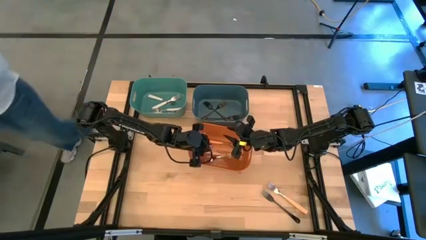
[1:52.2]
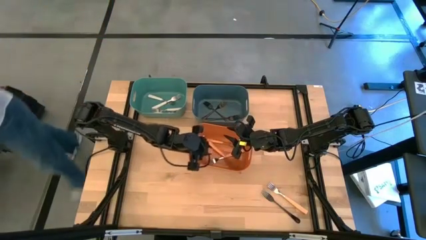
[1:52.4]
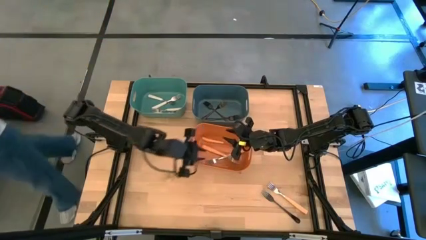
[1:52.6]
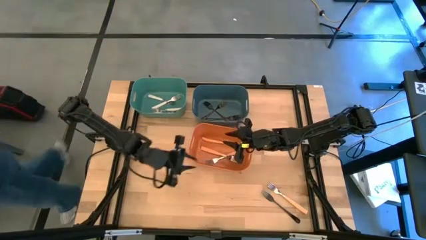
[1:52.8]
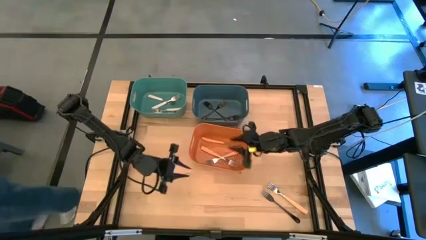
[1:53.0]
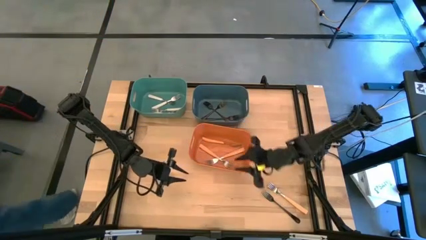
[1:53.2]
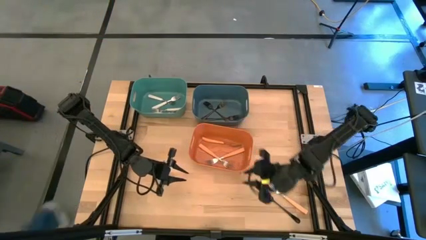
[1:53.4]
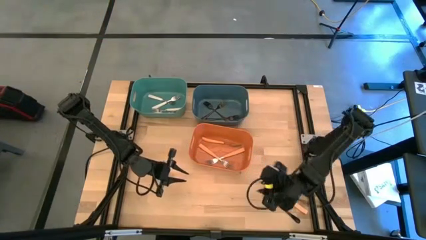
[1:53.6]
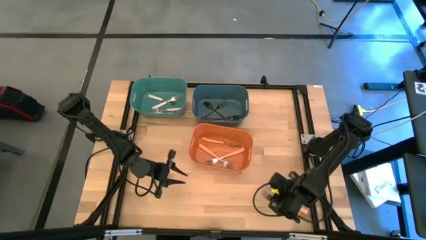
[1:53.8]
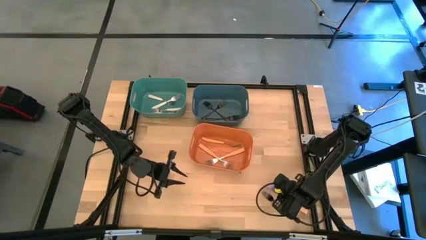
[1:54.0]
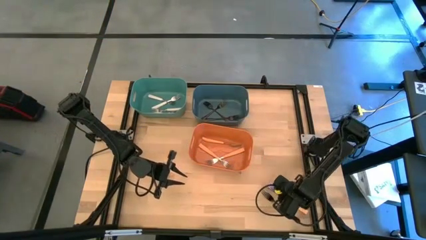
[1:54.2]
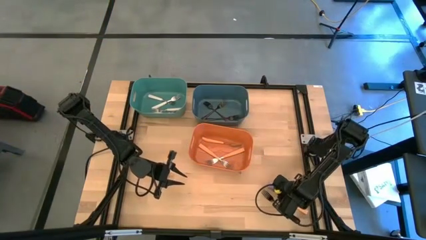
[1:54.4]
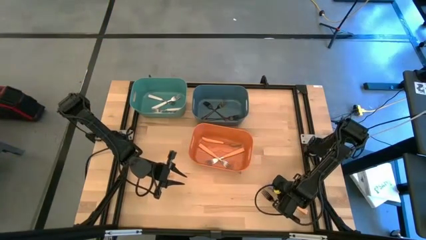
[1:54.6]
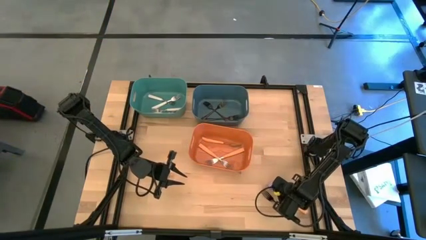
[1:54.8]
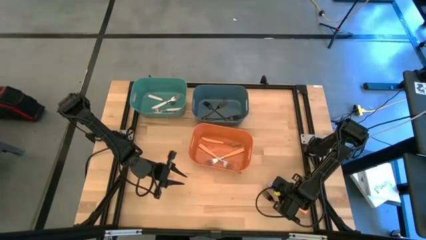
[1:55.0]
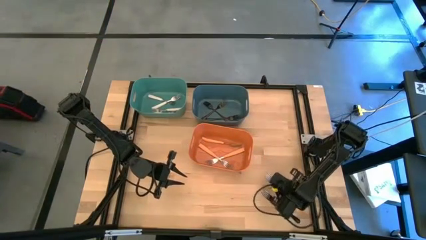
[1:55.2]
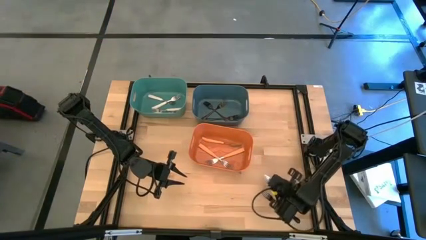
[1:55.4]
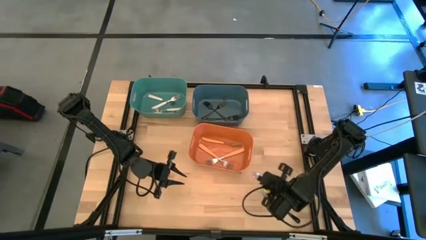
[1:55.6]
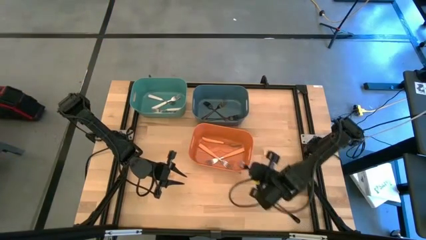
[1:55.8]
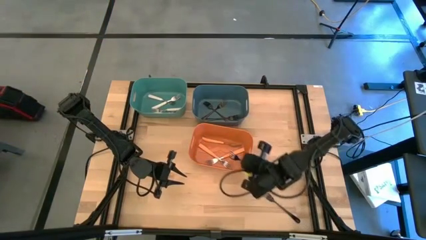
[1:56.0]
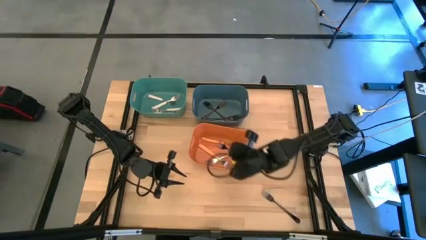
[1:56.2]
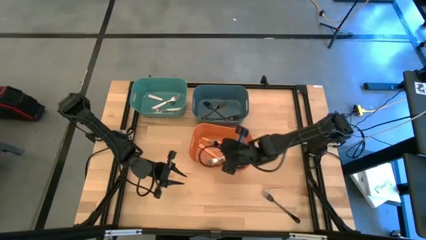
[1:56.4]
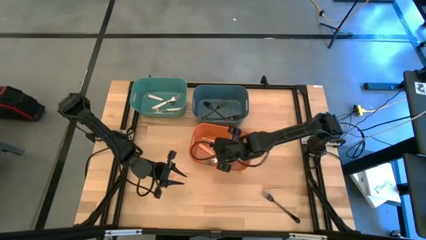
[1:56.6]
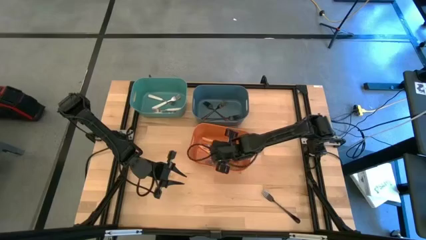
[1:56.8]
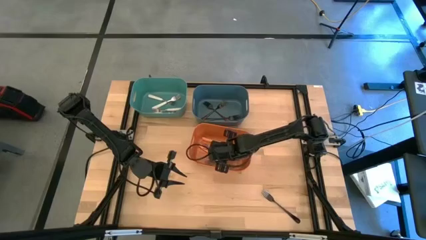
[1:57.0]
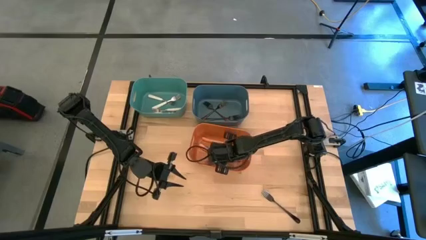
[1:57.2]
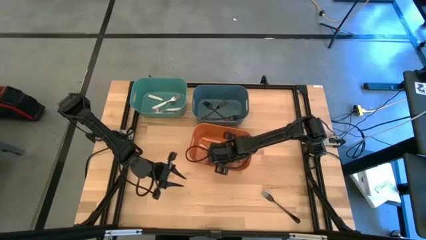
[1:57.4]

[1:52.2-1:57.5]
Task: Sort silverware by color (type)
Put the orange fork into the orange bin

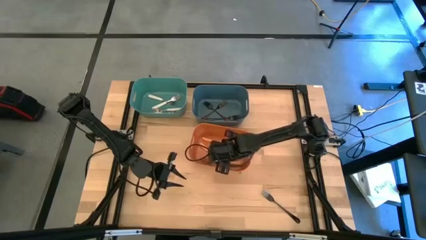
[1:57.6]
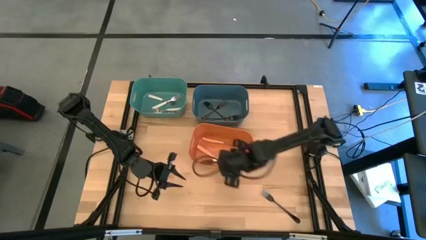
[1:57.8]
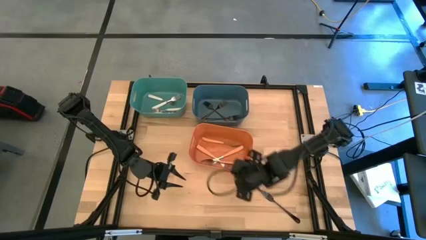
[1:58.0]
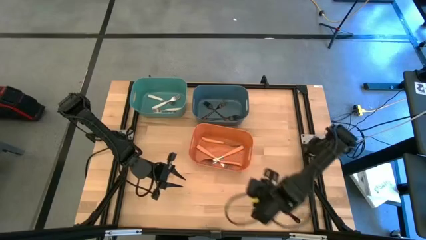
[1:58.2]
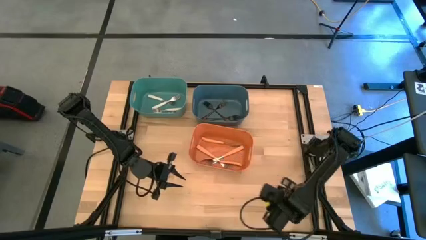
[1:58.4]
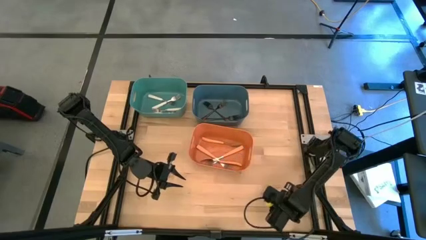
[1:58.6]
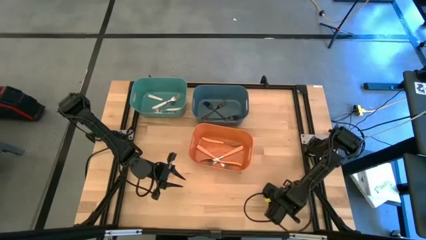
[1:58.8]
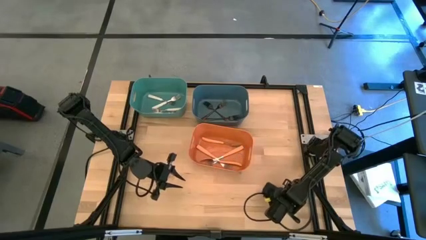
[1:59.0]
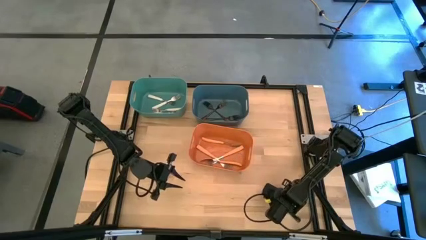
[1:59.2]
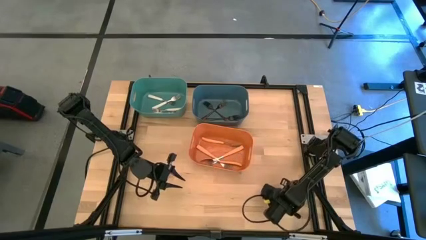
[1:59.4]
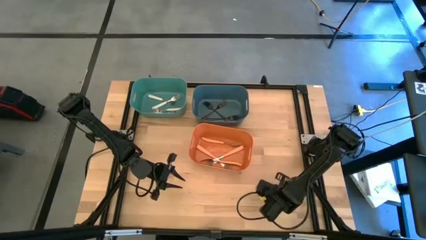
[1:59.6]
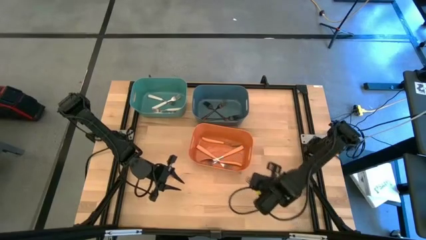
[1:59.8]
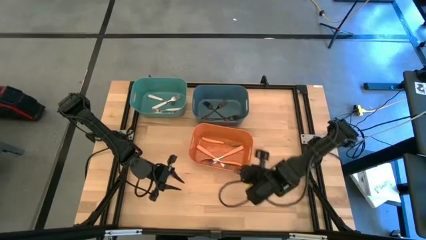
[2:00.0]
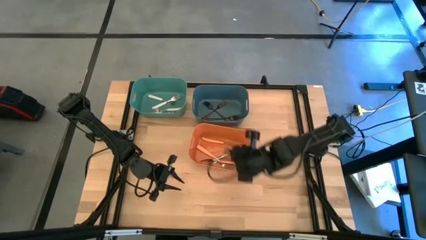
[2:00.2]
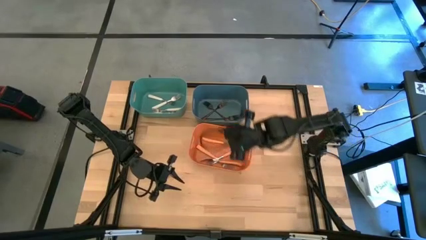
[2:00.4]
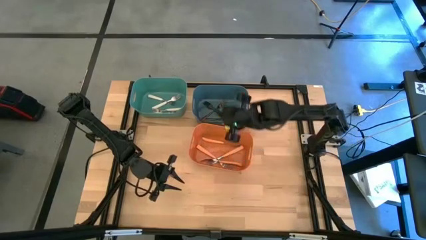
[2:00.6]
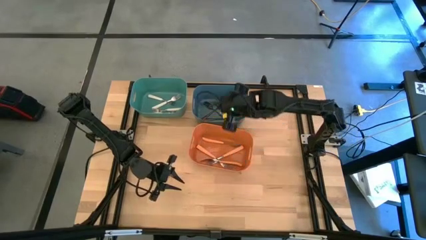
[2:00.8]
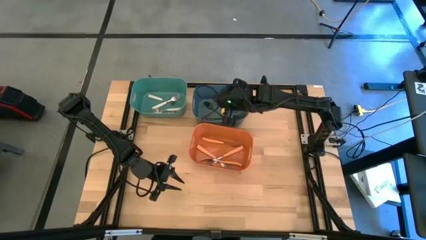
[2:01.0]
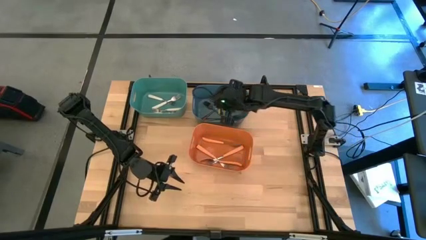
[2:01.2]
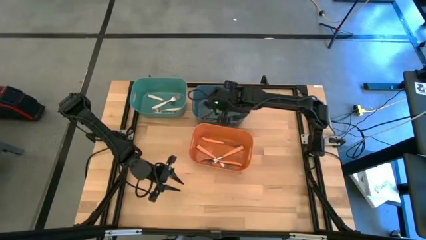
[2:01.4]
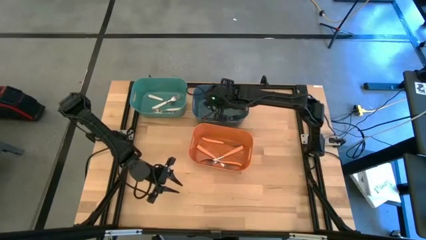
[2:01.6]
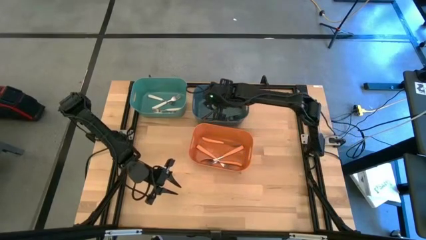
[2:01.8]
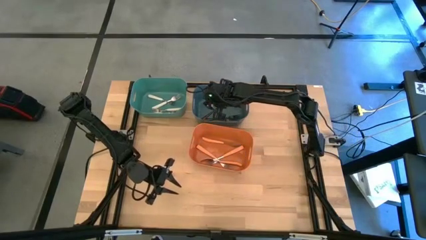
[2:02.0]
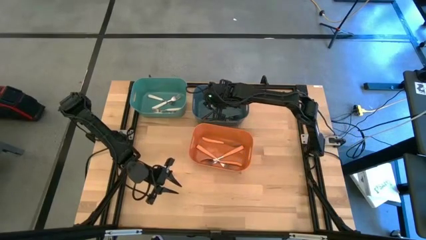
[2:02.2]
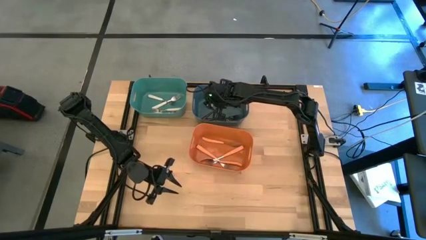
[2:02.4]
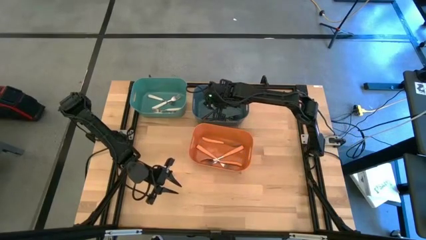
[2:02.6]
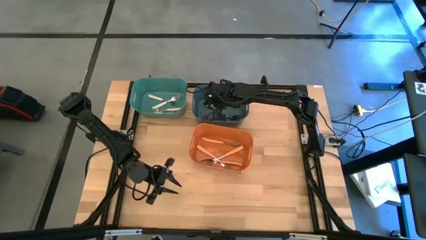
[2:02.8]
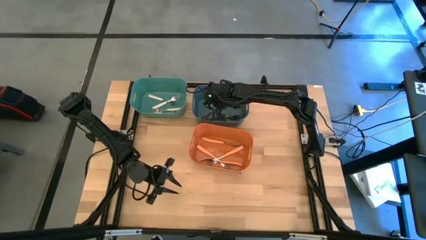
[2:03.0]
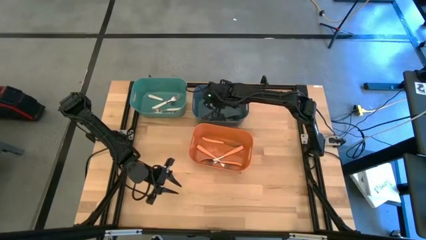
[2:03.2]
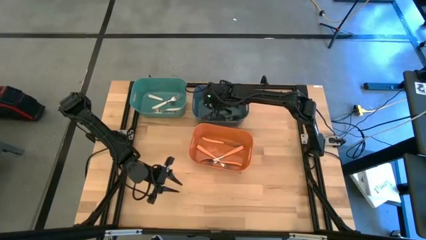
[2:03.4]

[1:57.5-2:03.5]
Put the black fork into the blue bin

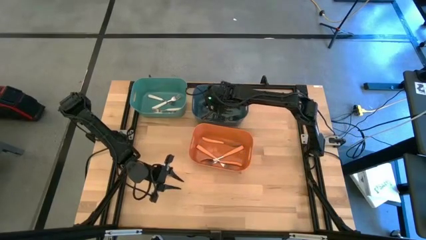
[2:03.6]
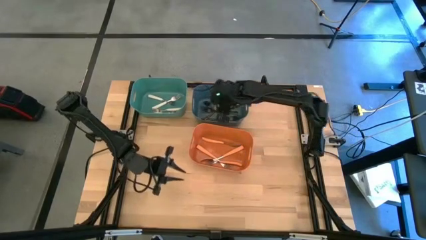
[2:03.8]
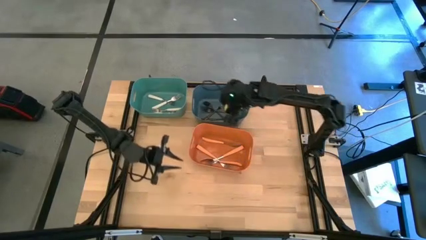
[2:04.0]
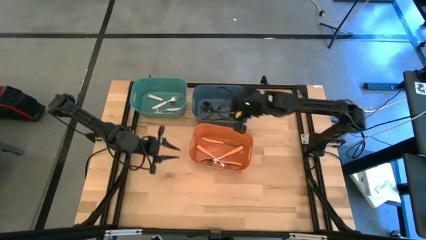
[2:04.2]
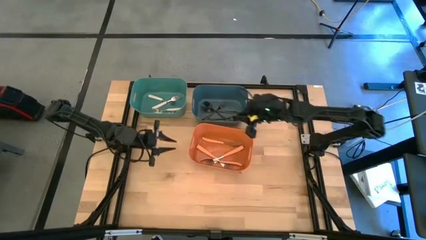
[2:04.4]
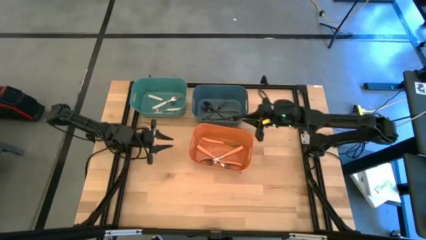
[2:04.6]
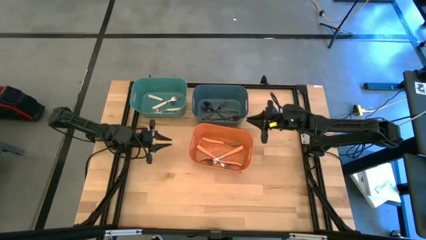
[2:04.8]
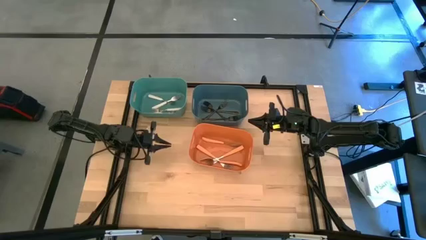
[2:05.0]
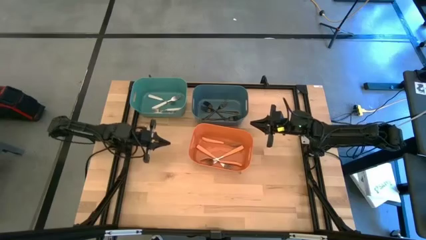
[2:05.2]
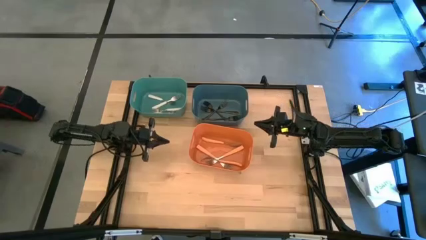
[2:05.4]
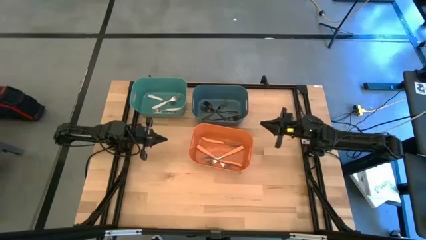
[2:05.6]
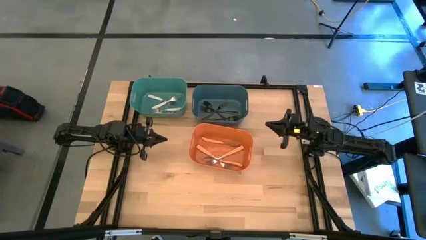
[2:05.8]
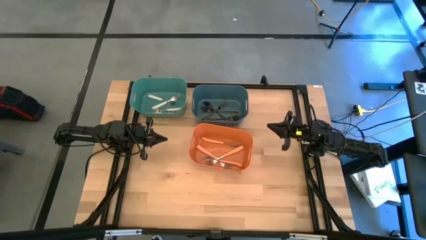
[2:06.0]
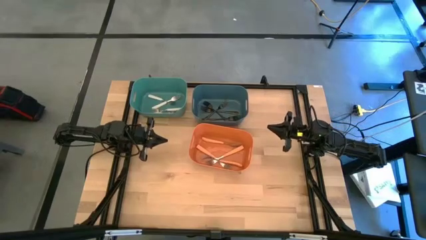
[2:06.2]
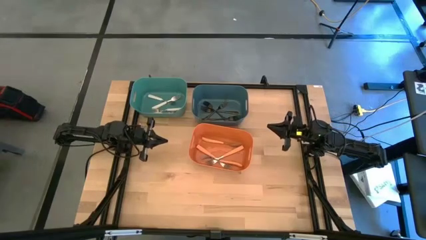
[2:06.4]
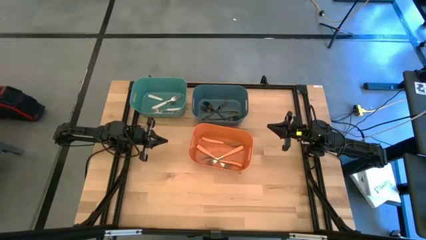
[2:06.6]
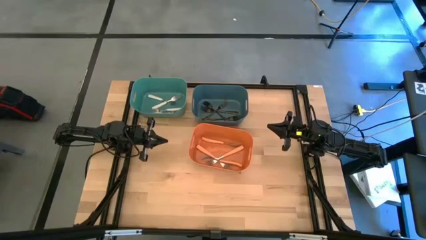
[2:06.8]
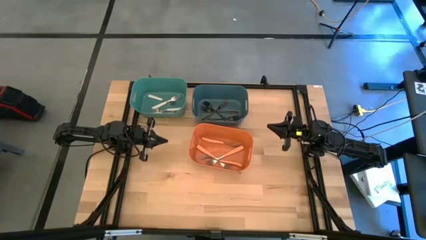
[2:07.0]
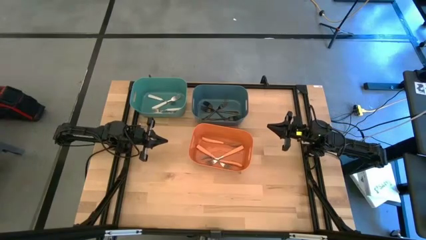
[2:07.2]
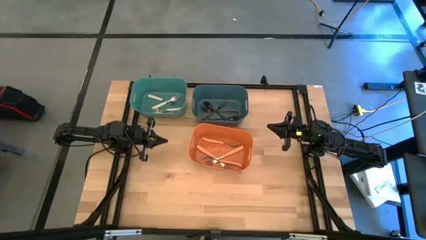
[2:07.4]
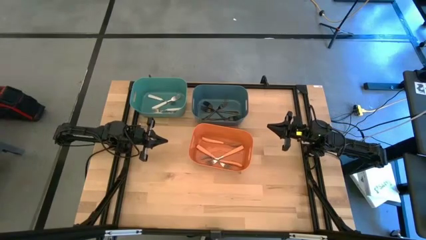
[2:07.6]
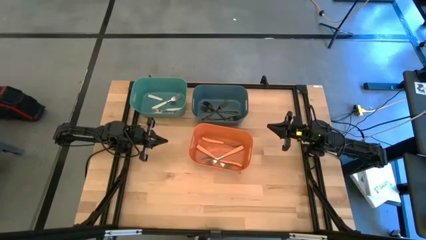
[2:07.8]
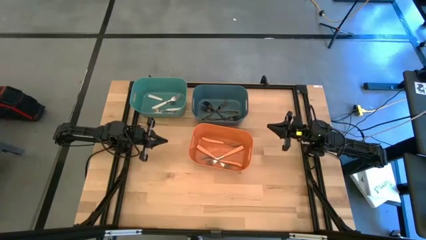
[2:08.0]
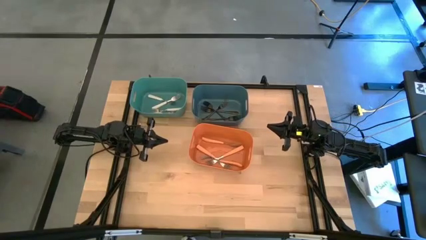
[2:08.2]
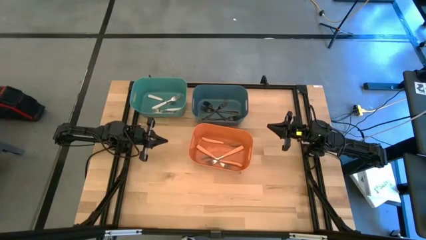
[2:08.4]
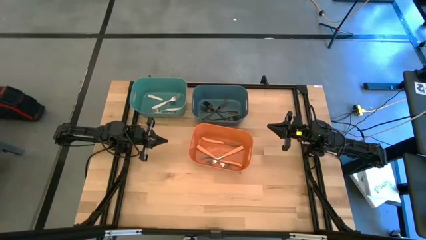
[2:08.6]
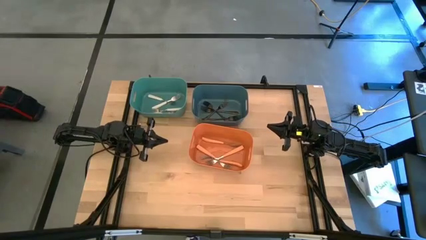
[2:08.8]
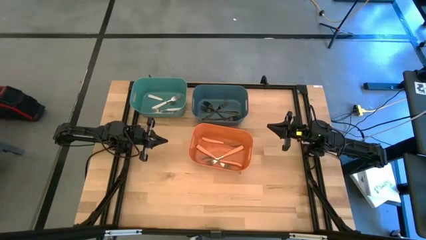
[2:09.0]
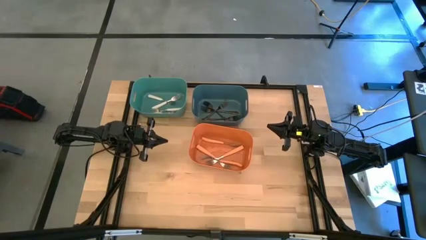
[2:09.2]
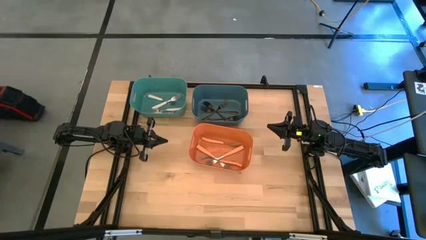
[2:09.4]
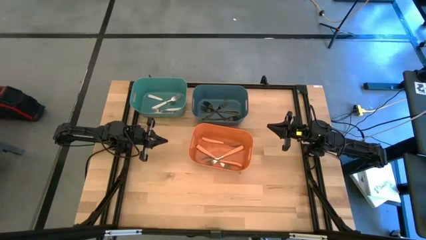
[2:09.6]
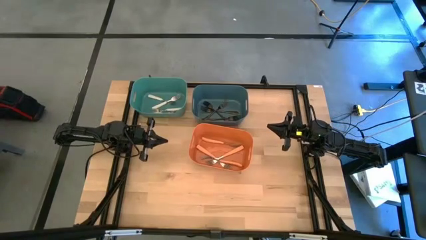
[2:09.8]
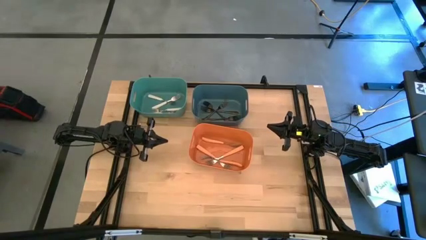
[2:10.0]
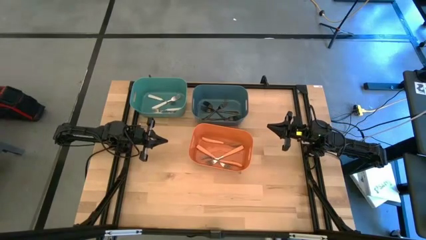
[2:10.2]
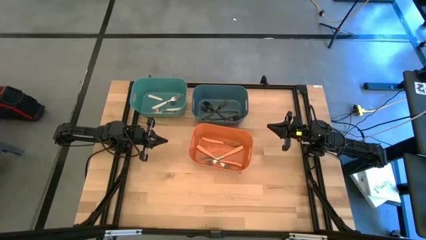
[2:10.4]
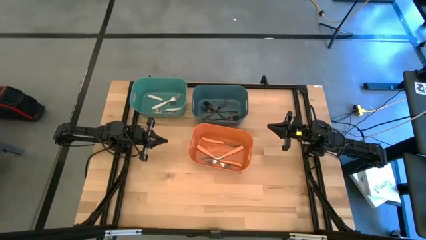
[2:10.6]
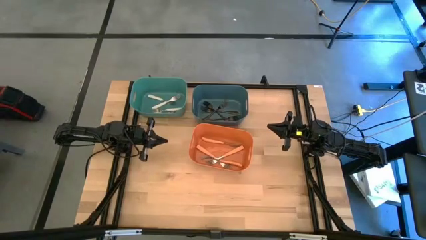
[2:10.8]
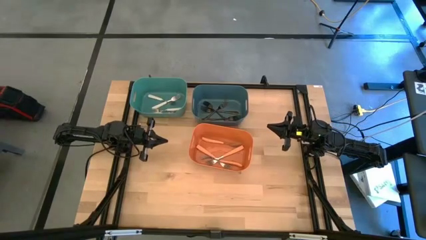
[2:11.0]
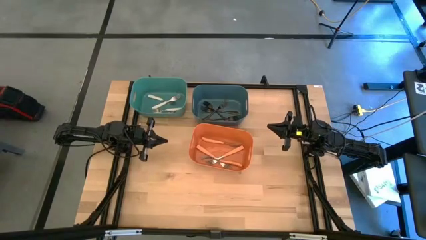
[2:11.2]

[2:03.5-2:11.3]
Return to Home Position
